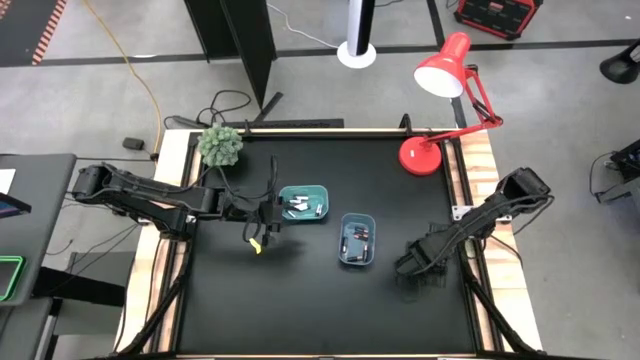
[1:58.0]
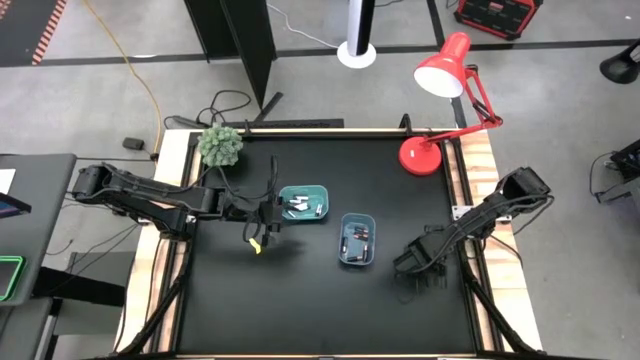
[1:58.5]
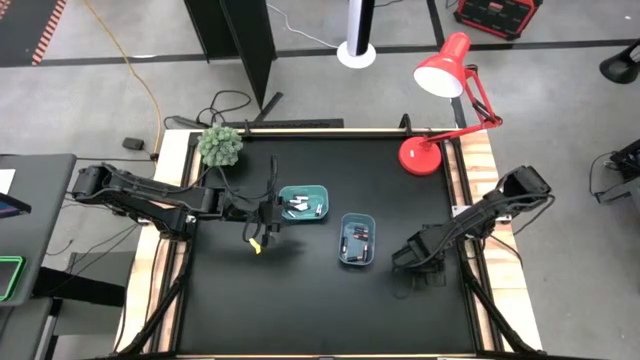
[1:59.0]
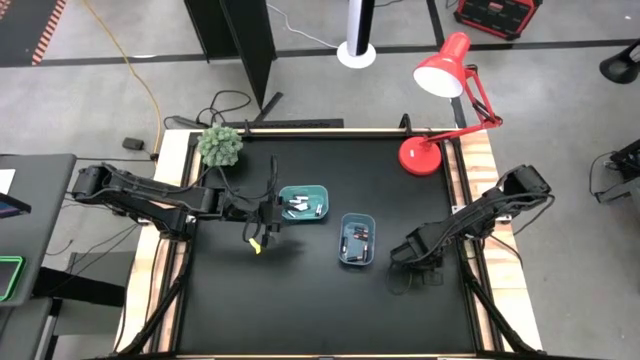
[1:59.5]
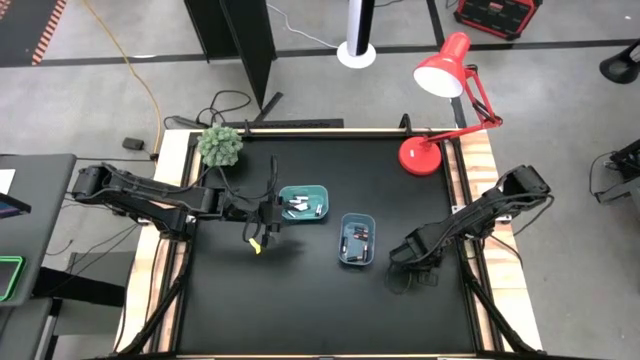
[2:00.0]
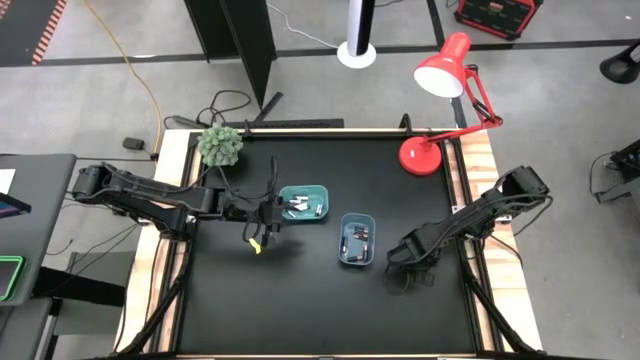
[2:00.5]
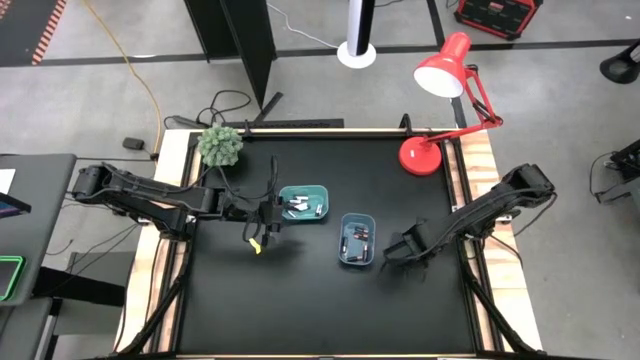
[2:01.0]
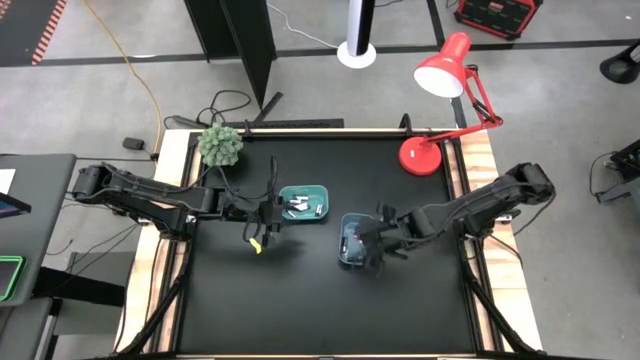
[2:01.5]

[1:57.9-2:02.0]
Task: Sort batteries
Put the black battery into the blue bin

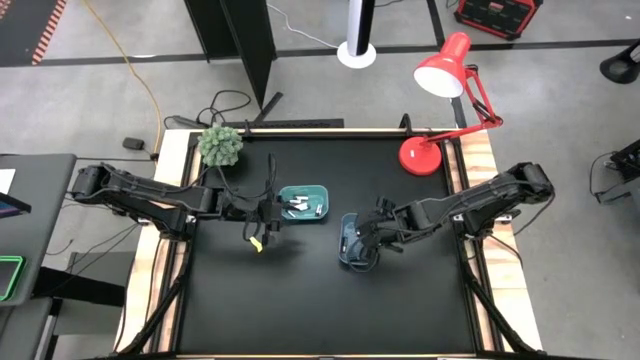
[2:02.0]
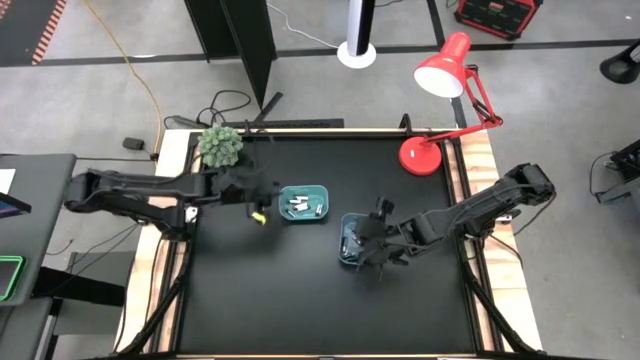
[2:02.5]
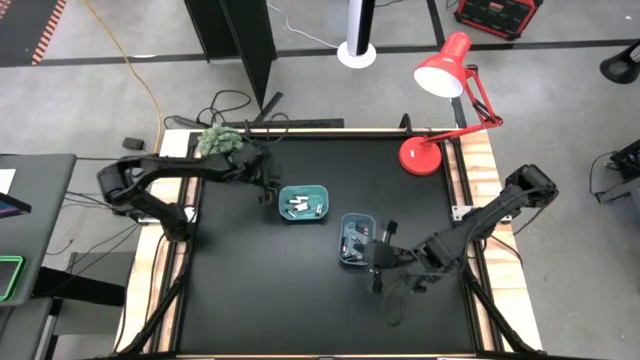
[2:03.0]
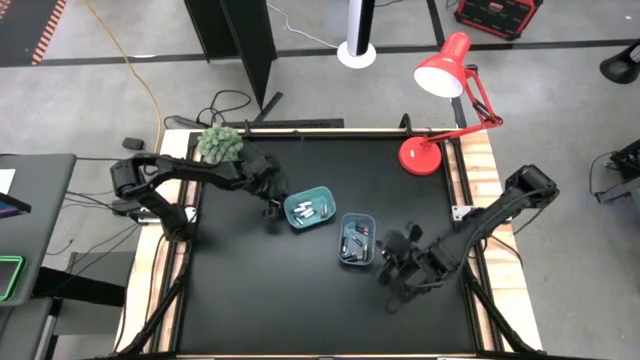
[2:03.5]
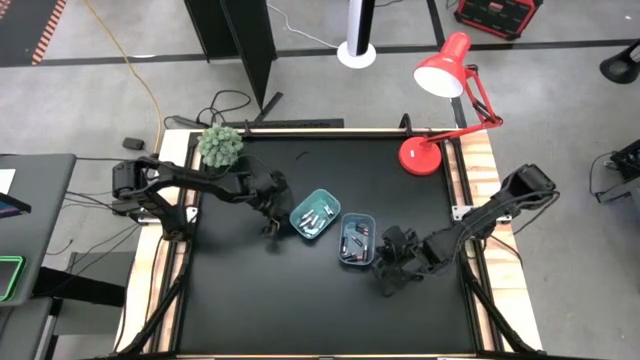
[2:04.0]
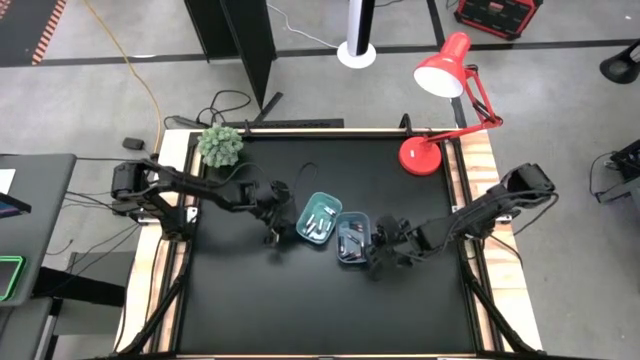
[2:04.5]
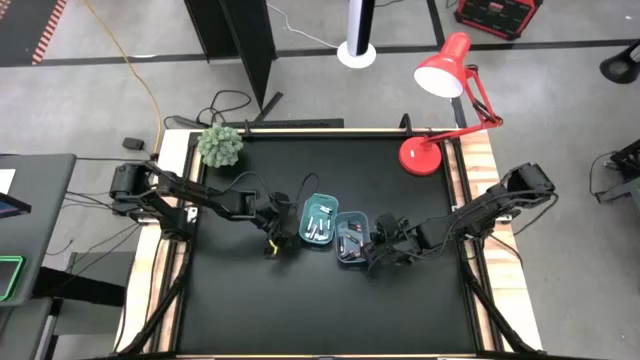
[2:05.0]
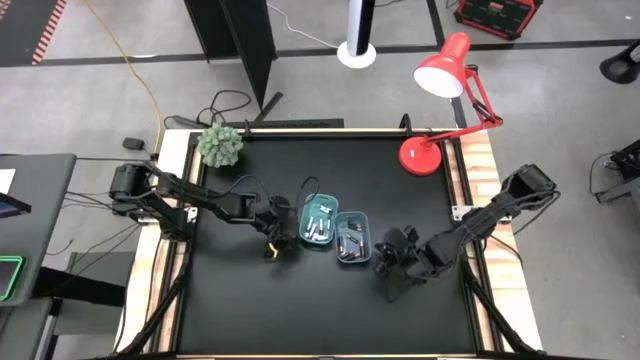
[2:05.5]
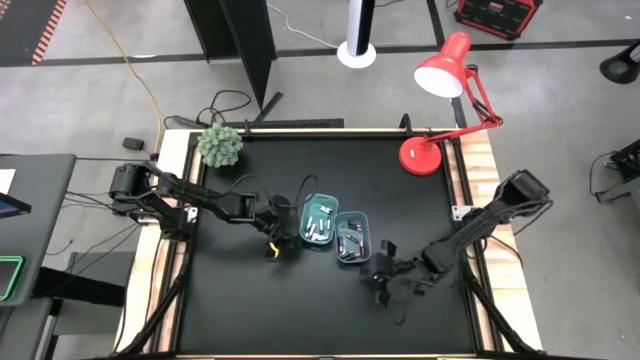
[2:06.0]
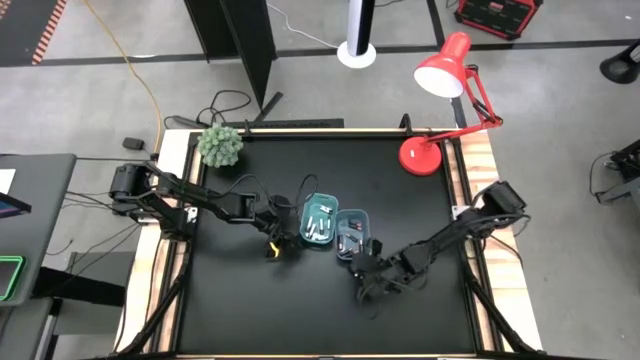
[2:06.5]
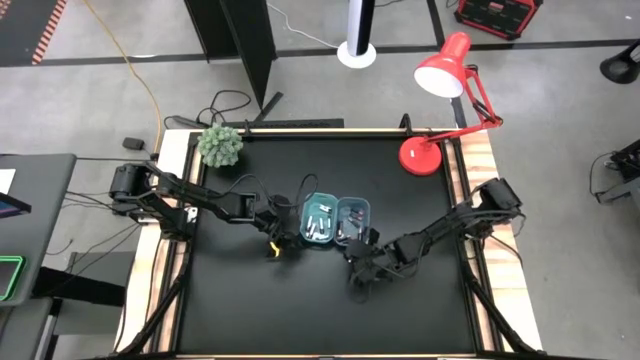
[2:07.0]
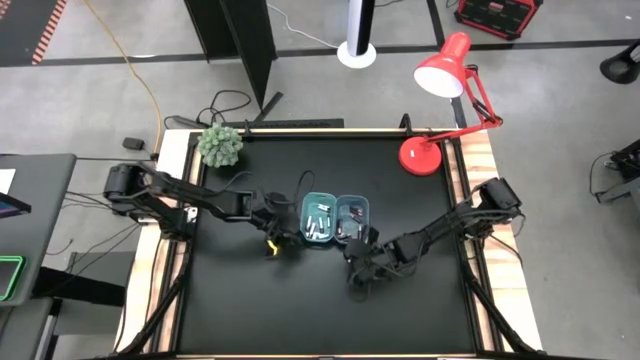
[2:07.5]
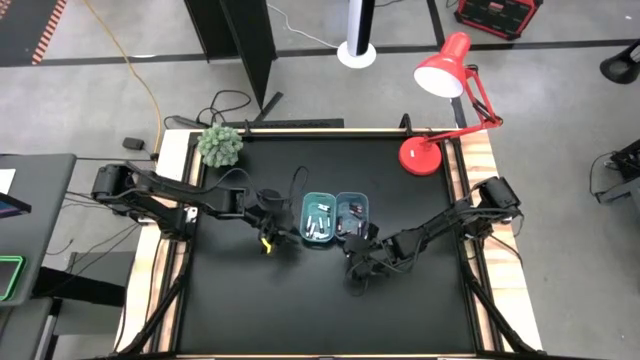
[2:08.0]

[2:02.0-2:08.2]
Adjust the light blue and blue bins

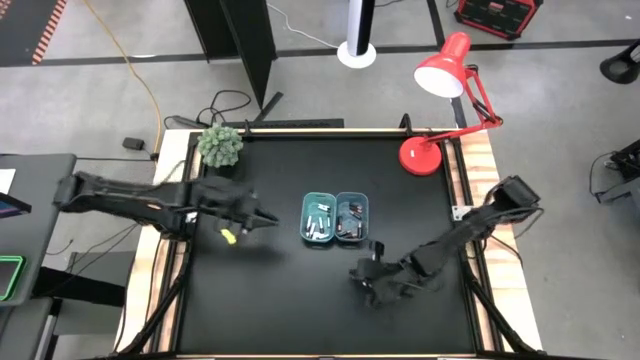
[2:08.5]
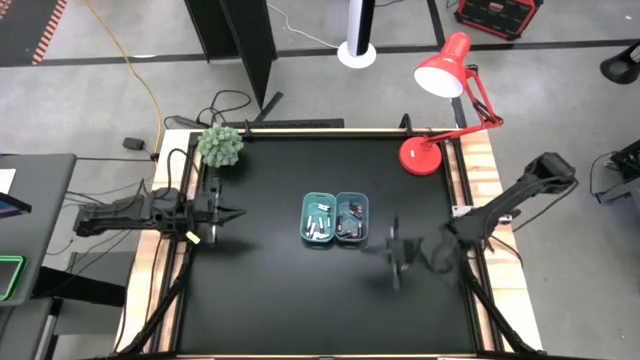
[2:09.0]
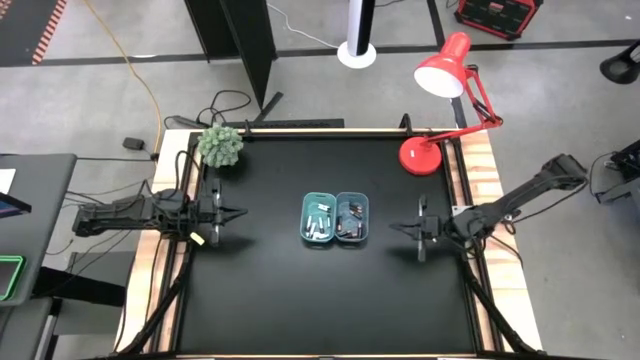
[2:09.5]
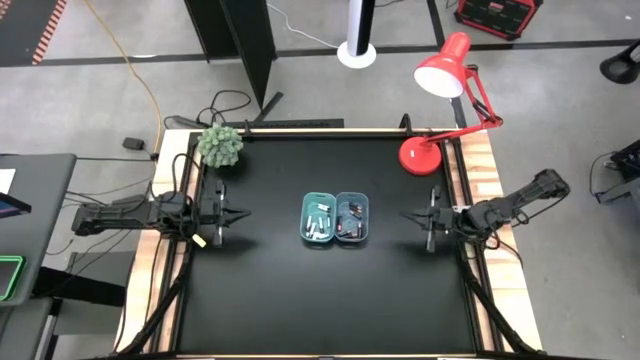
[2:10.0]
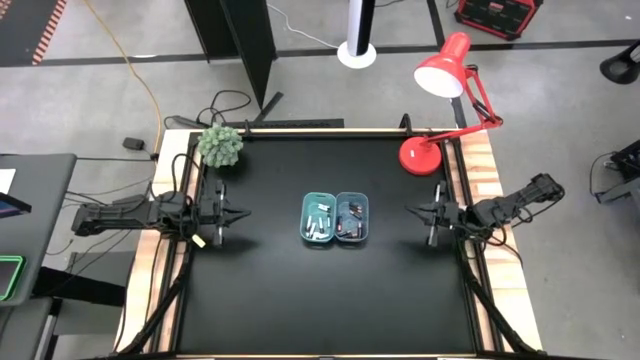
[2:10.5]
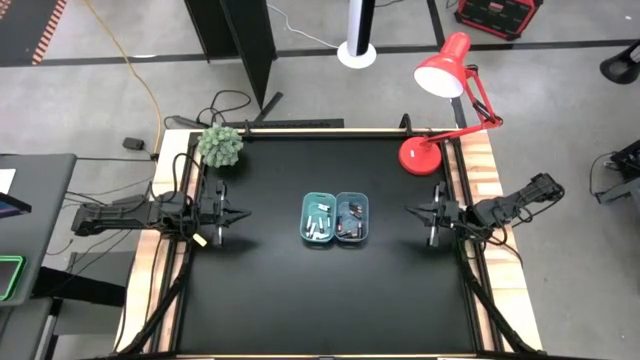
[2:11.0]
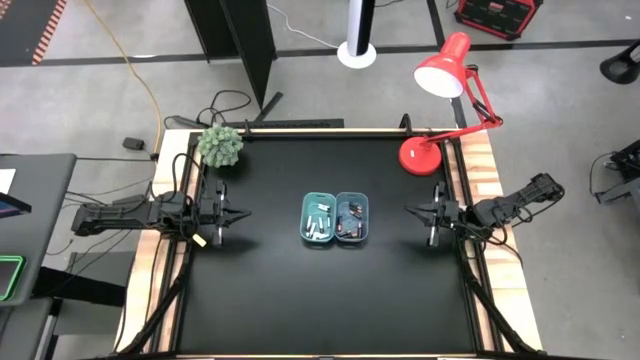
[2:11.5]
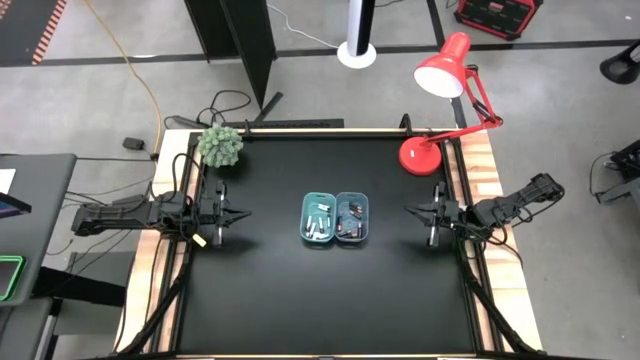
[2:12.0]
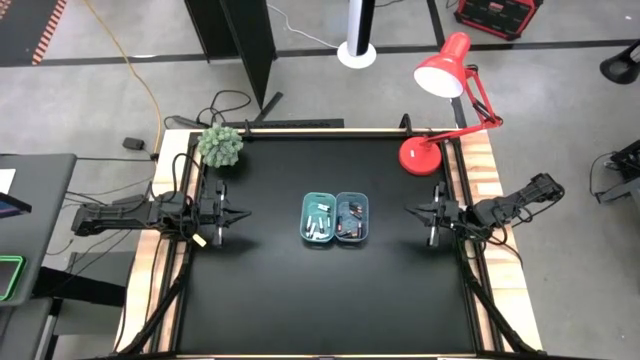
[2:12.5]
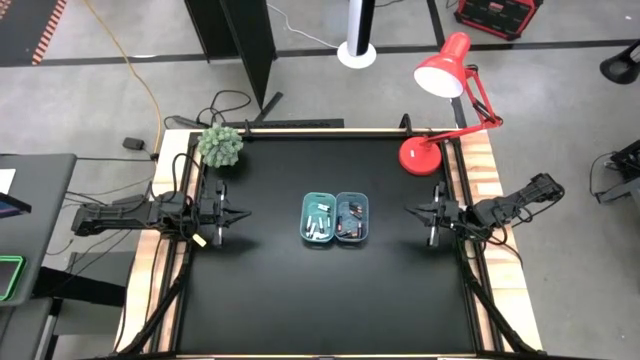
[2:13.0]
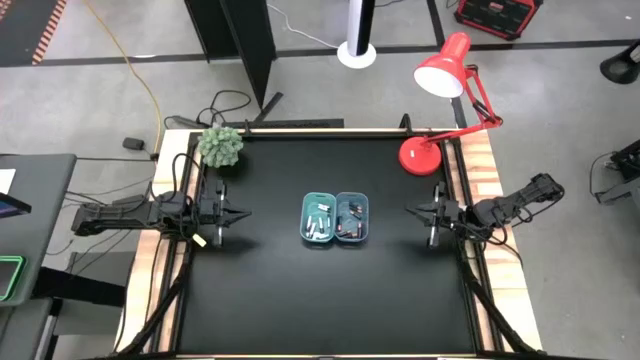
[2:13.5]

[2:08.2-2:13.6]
Return to Home Position

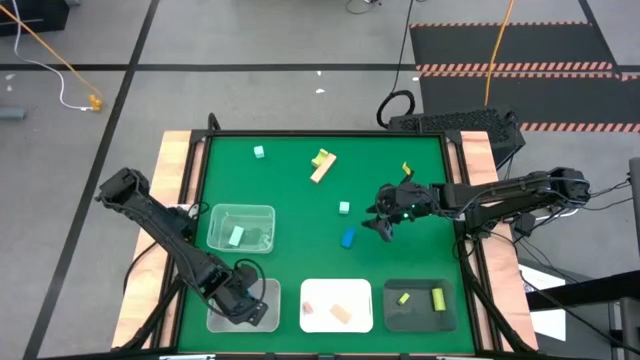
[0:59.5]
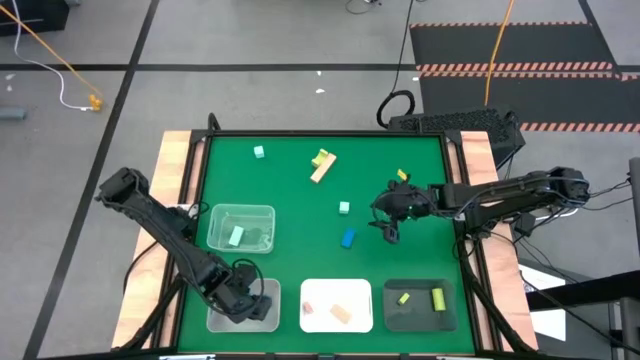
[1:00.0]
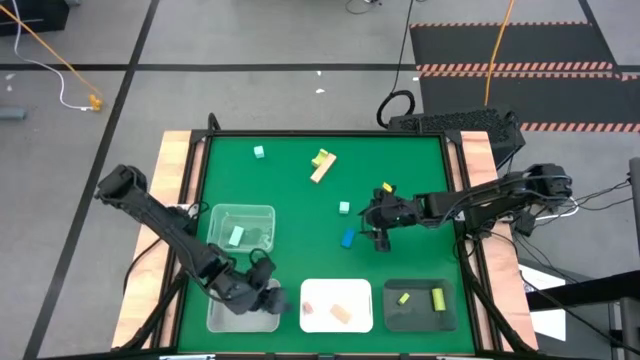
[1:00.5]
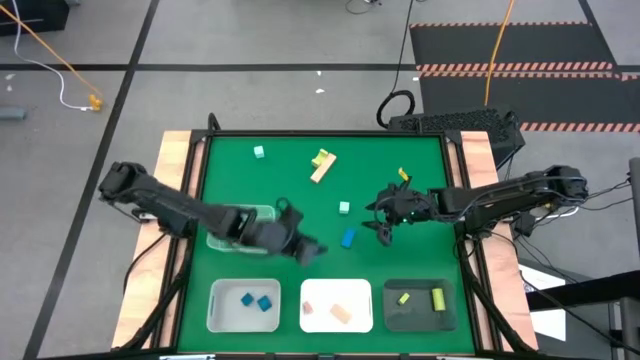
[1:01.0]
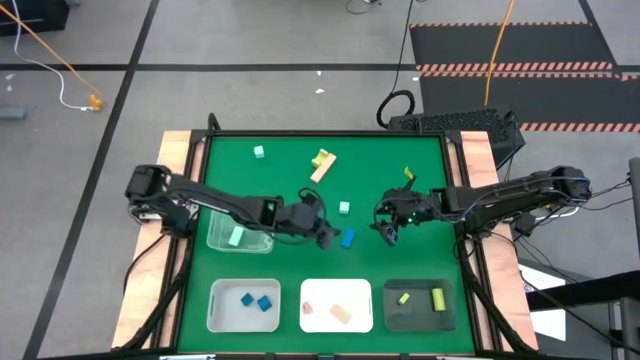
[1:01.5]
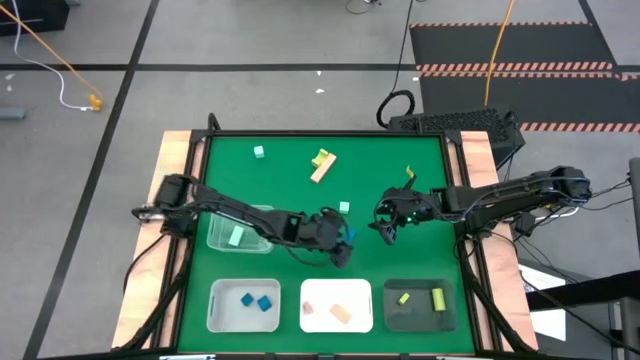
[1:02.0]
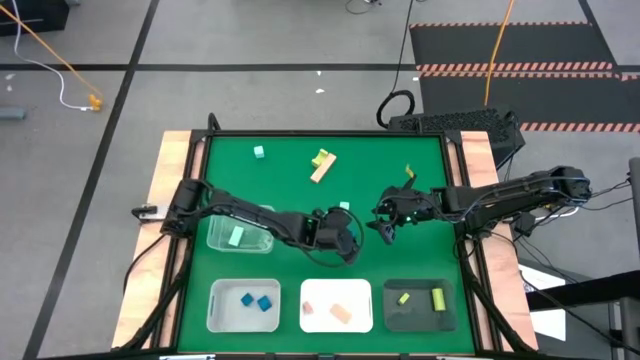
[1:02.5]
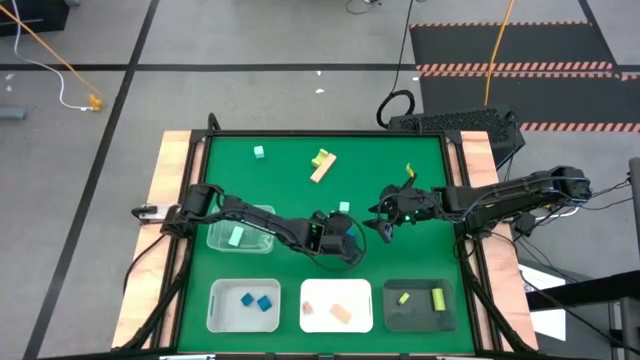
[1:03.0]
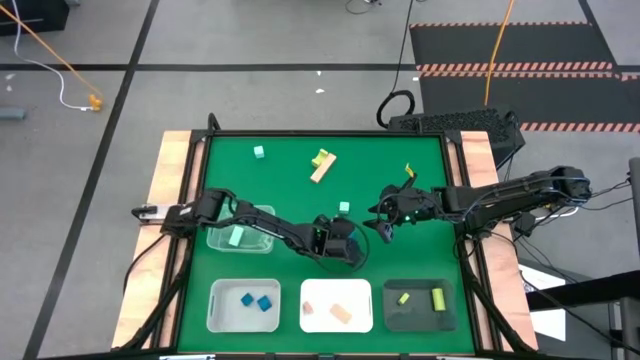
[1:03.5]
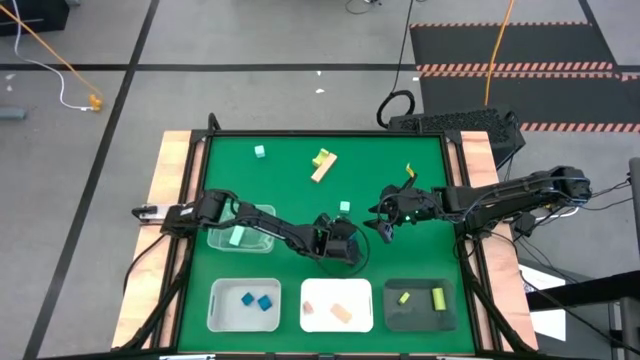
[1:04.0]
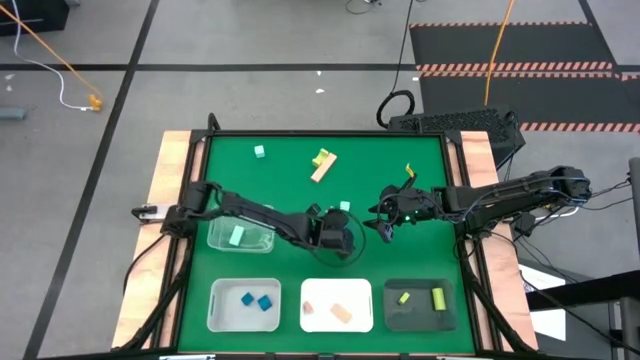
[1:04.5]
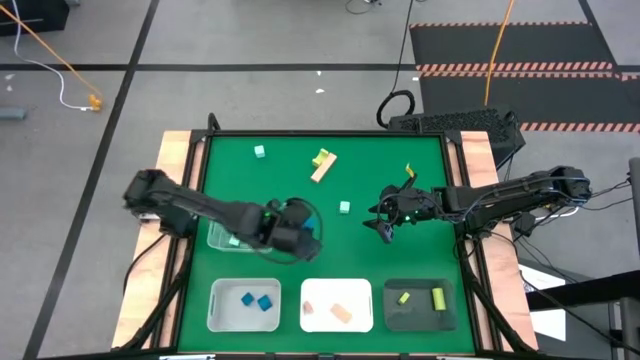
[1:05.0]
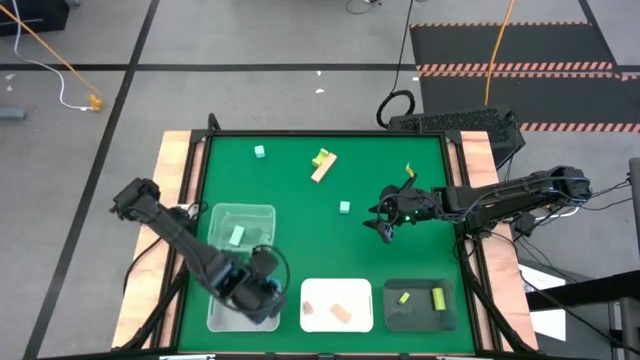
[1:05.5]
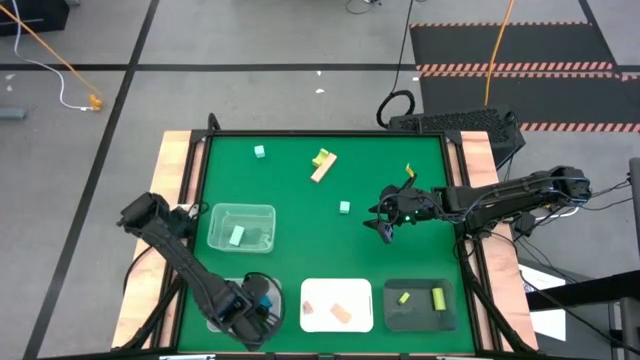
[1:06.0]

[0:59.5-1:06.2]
Task: Sort & place blocks by color
Put the blue block into the gray bin
